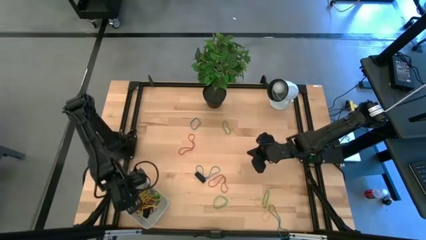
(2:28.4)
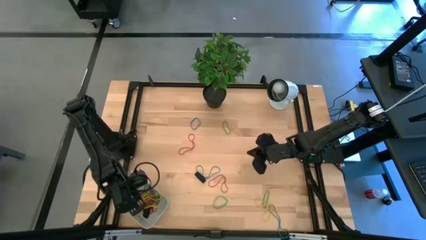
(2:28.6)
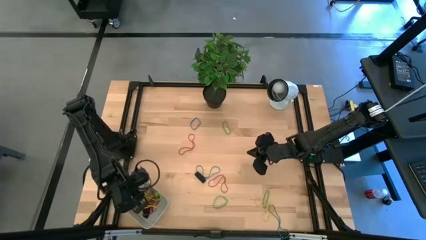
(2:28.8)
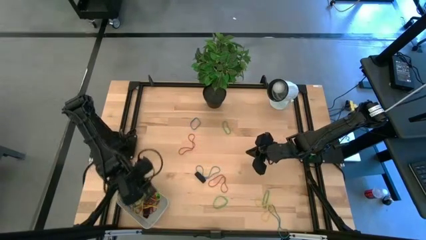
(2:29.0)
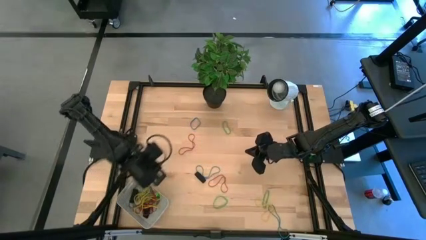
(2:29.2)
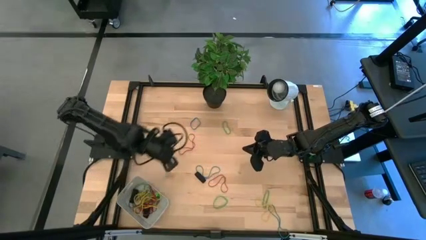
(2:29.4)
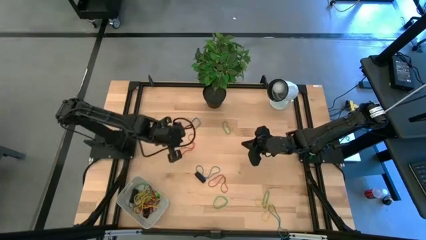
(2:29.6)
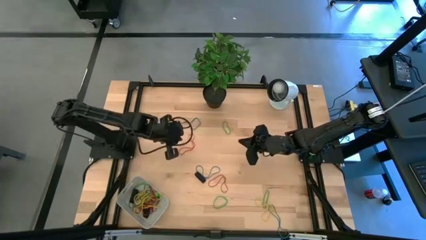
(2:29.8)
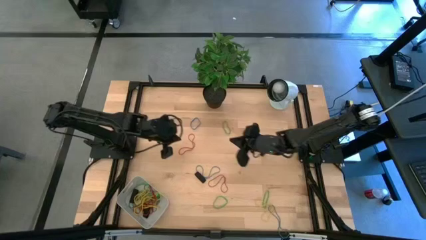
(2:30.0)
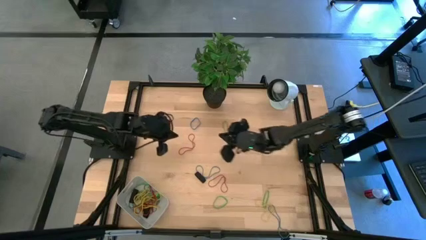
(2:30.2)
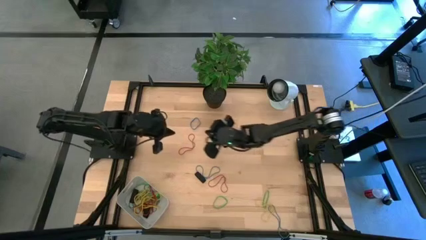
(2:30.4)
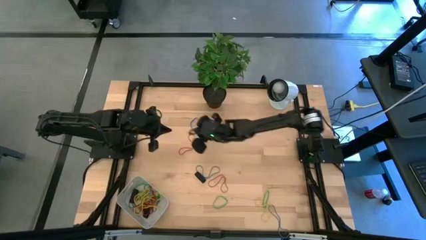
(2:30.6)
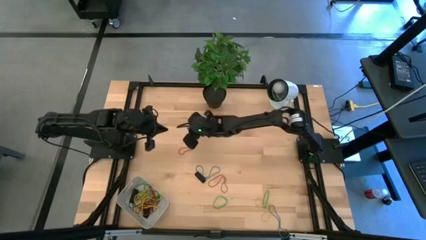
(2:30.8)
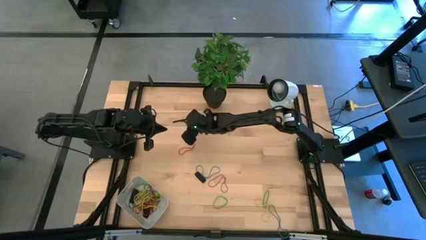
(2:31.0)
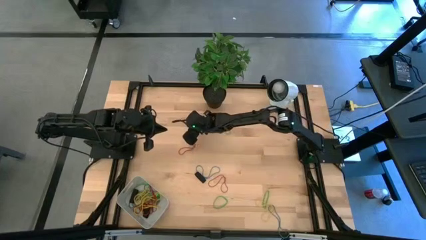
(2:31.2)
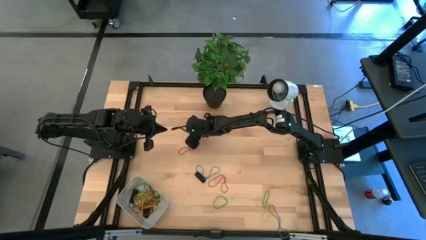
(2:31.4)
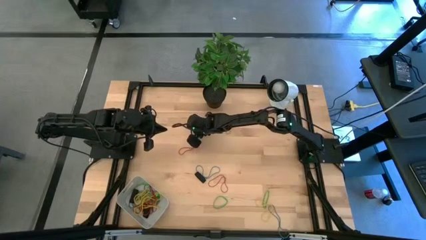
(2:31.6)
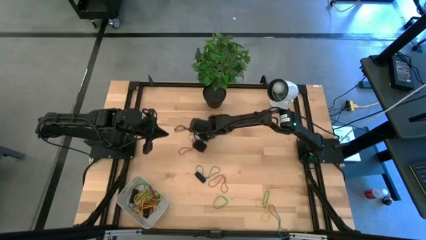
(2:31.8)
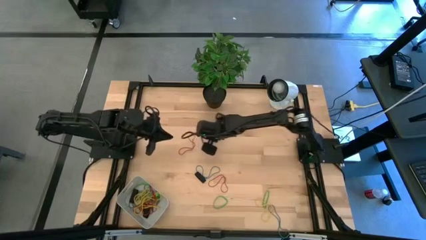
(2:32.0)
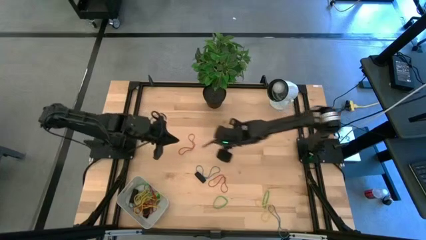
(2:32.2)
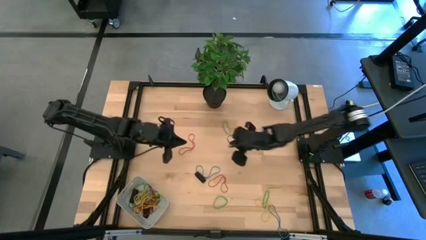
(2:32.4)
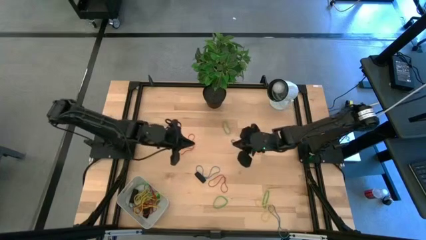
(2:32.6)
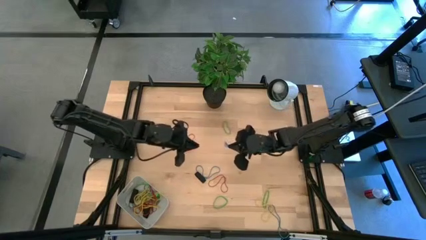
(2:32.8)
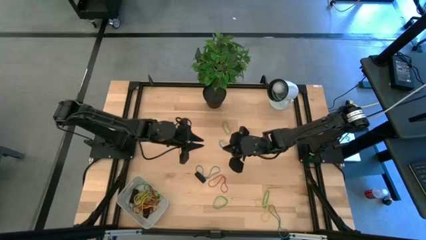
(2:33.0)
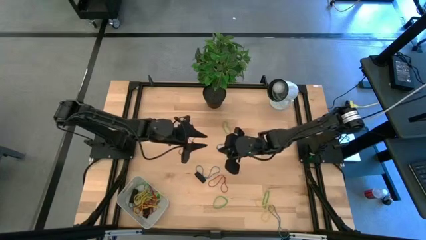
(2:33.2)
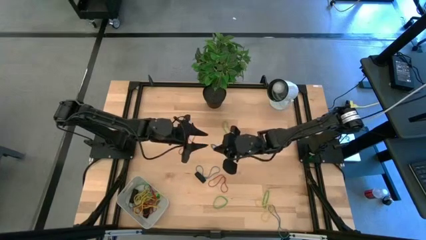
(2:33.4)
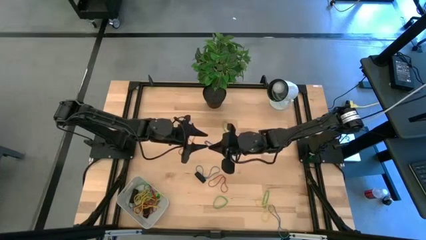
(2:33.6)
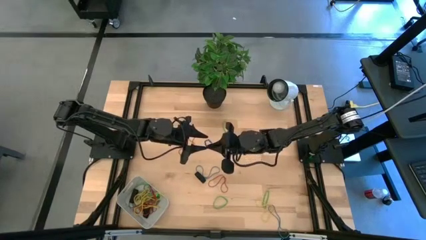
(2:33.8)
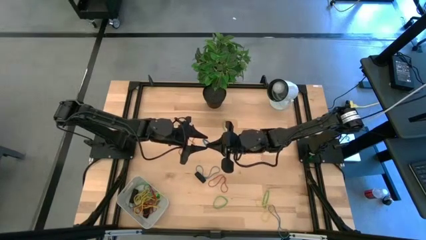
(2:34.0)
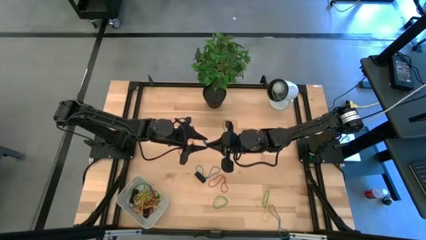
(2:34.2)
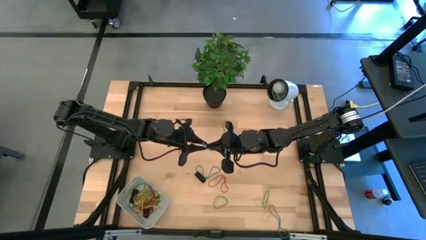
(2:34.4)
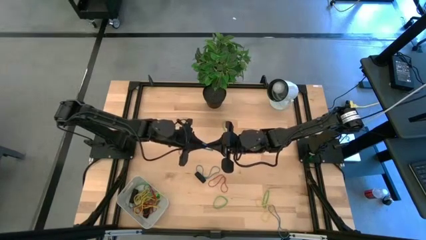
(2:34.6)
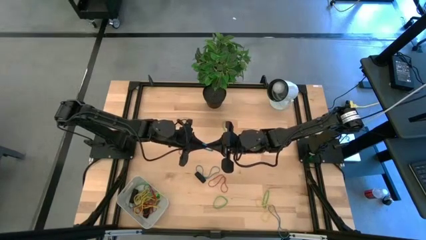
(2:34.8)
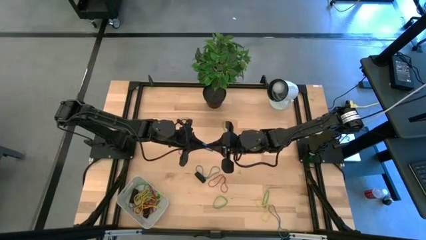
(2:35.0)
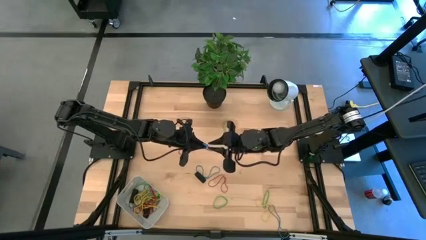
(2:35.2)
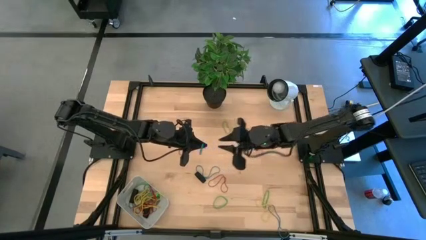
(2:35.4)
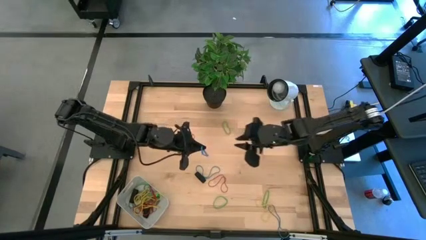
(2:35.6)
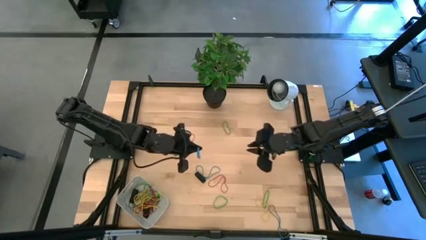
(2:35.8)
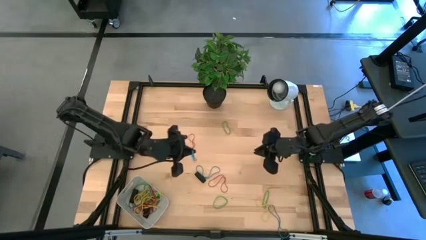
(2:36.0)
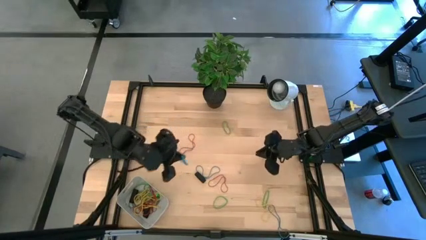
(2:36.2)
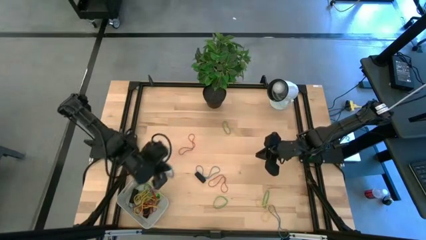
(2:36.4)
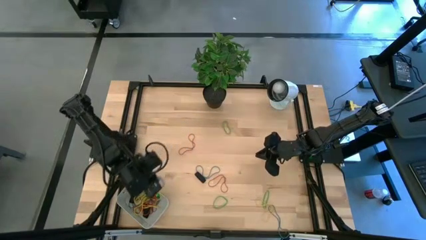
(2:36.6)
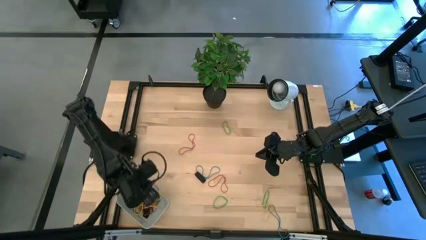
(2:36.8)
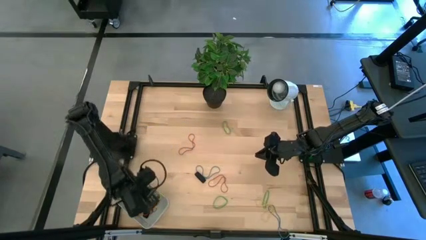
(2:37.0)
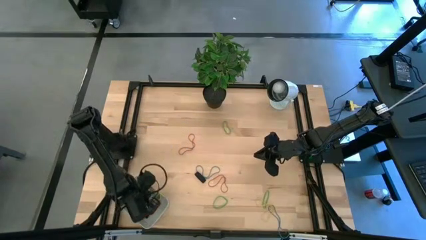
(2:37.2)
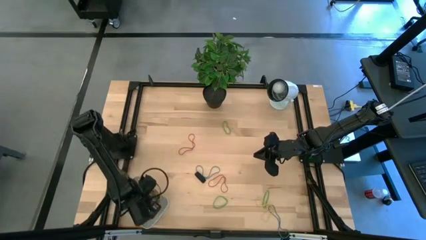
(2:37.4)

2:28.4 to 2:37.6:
Task: Pick and place rubber bands into bin
Put the top blue rubber band into the gray bin

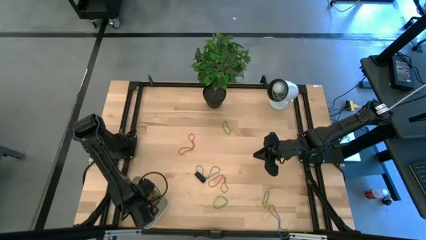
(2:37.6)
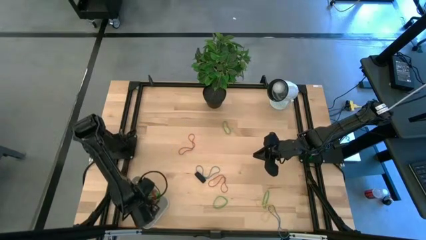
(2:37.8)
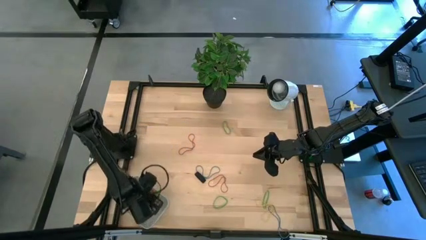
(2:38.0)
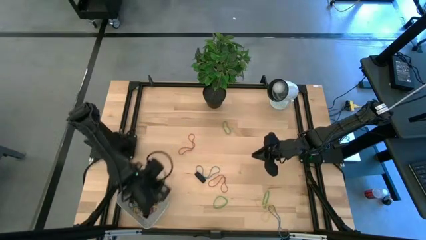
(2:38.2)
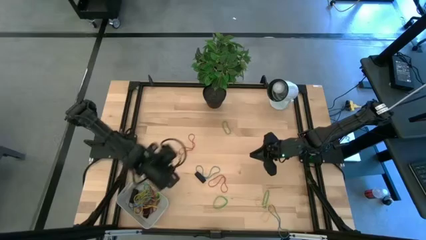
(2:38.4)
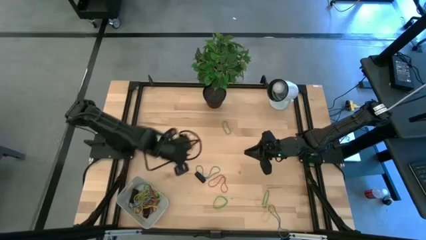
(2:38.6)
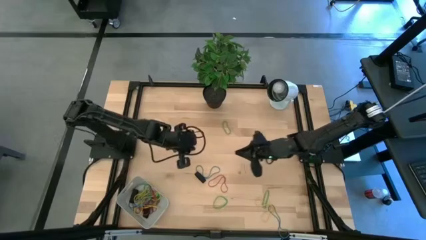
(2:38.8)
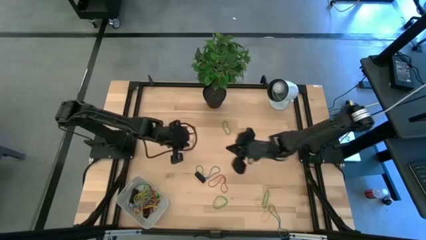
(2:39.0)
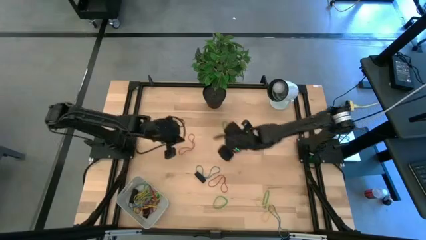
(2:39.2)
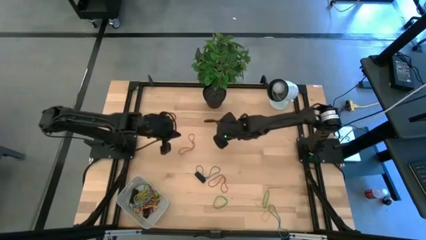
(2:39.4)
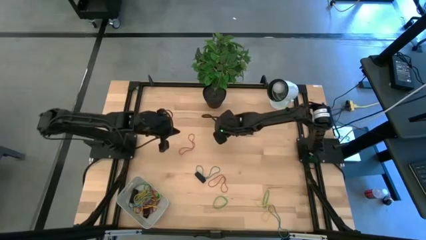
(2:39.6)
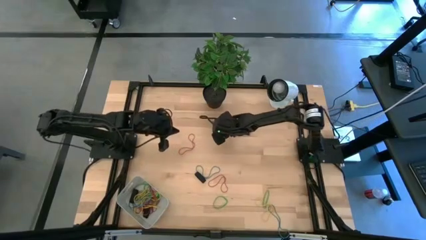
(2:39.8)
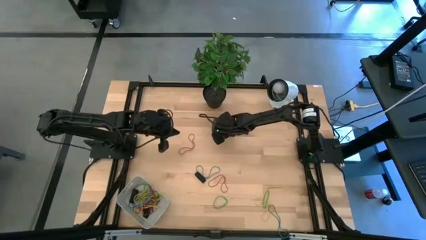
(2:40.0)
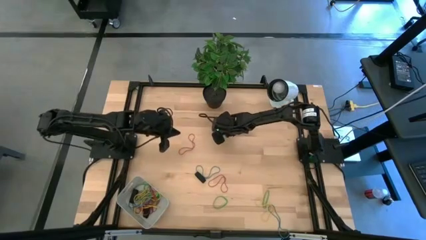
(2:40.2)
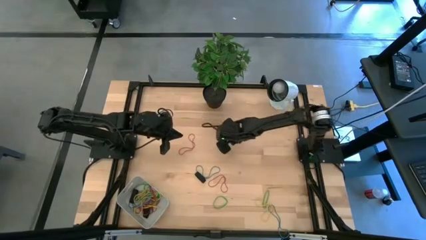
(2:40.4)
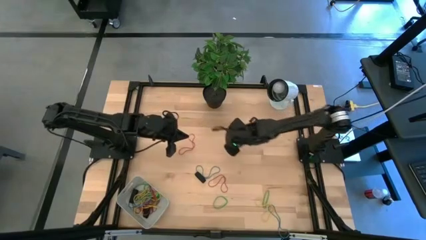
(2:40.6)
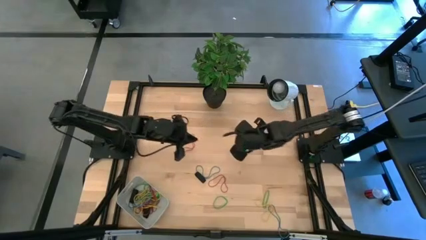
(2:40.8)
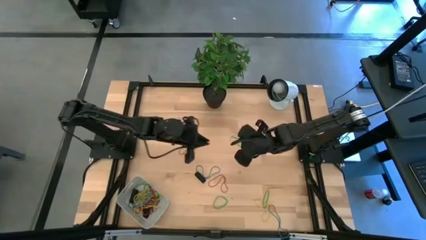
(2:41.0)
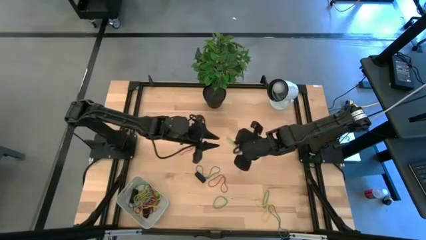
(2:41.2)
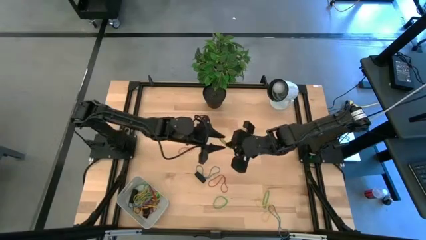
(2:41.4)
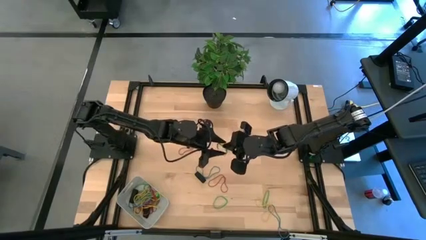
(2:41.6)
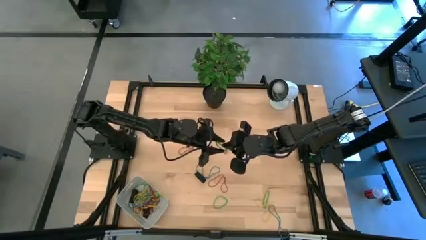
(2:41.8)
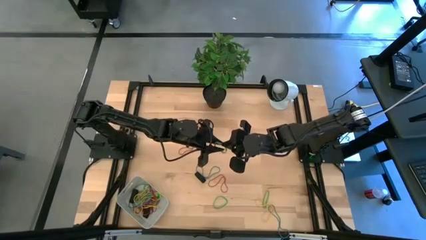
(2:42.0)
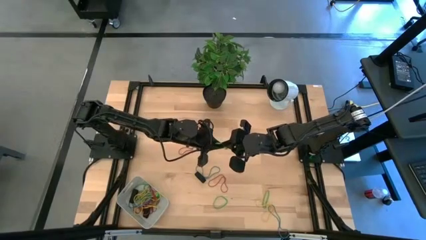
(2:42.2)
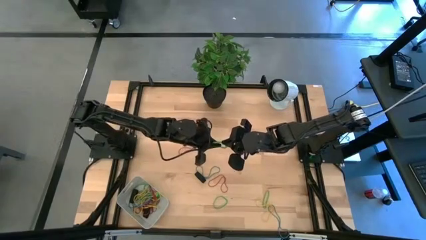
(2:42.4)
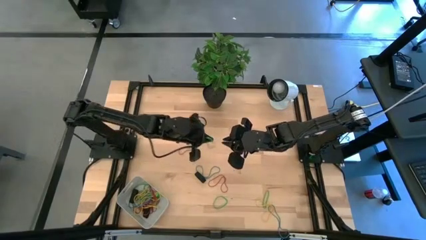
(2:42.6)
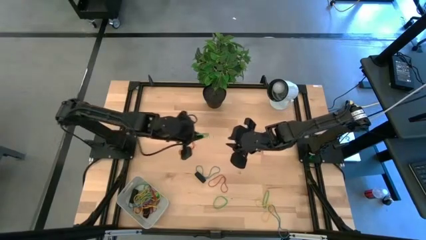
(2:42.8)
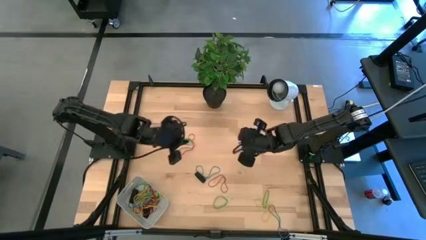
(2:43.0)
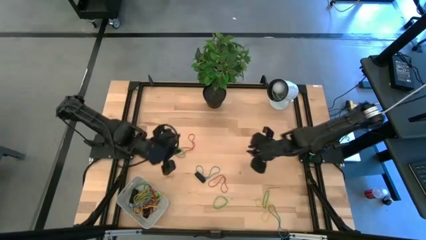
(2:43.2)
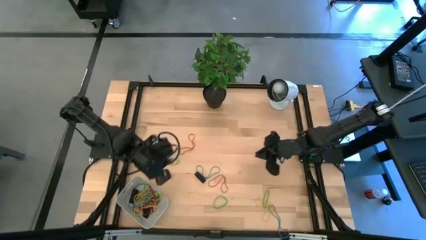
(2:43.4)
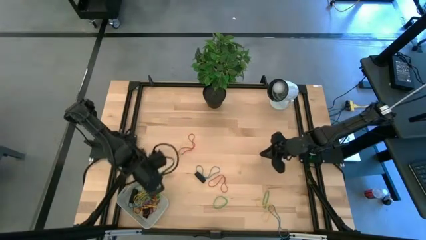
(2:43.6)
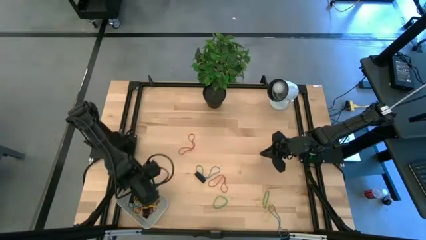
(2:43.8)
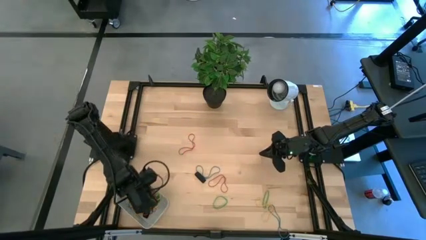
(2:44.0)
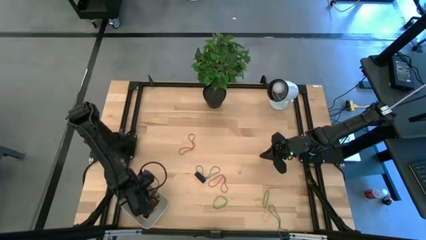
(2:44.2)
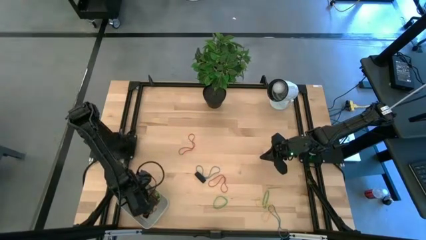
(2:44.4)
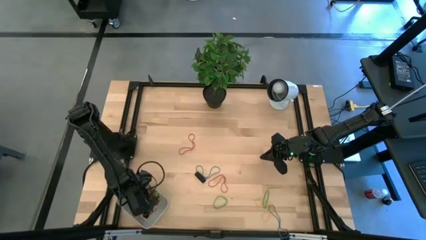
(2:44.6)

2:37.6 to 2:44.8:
Put the top green rubber band into the gray bin
